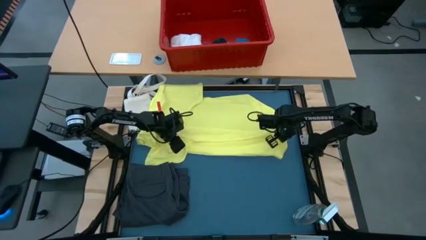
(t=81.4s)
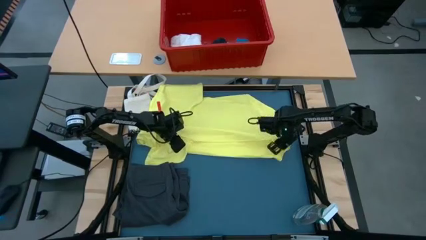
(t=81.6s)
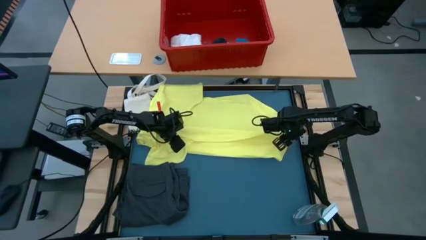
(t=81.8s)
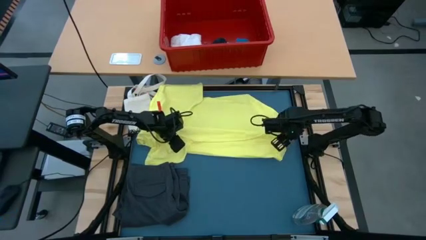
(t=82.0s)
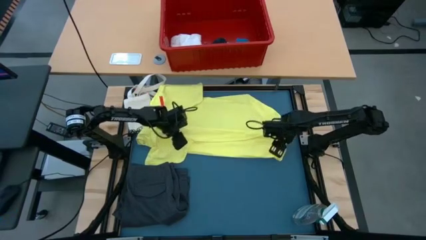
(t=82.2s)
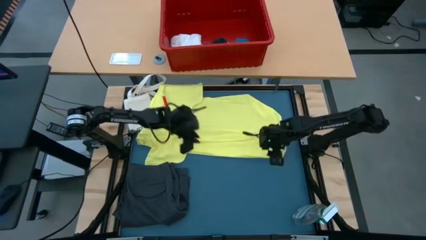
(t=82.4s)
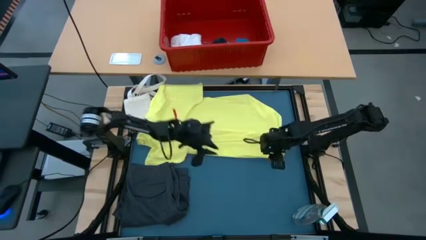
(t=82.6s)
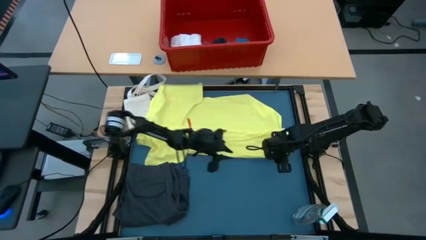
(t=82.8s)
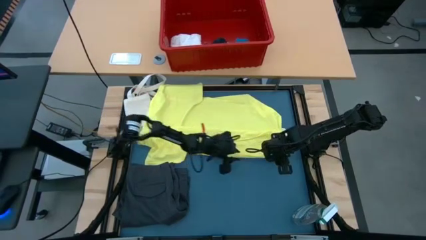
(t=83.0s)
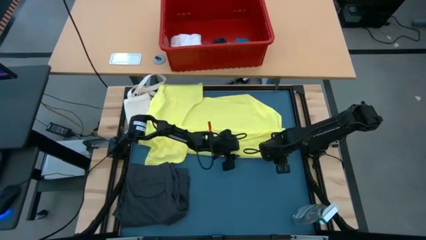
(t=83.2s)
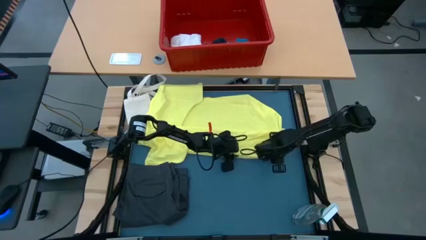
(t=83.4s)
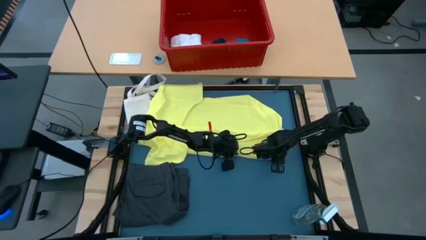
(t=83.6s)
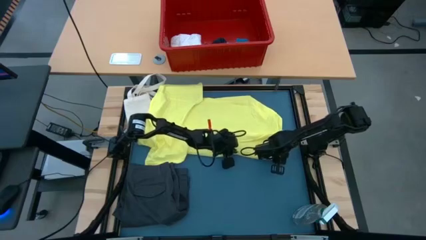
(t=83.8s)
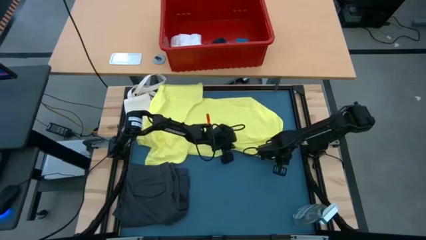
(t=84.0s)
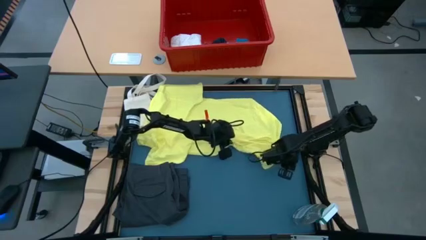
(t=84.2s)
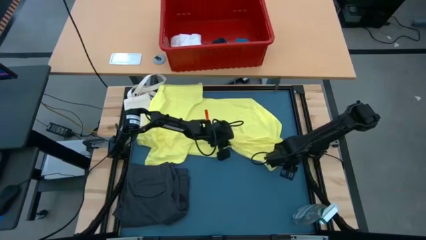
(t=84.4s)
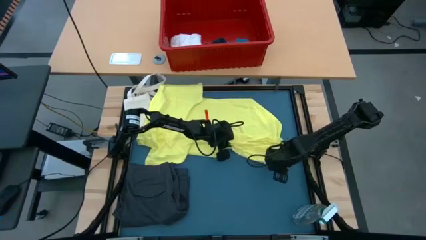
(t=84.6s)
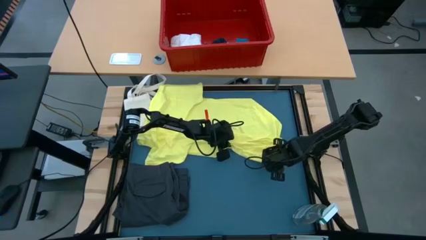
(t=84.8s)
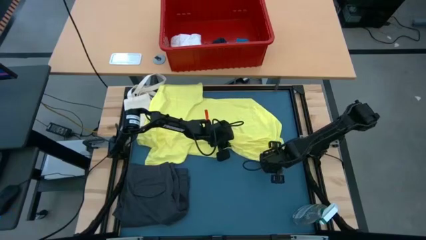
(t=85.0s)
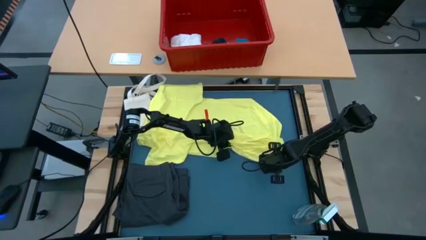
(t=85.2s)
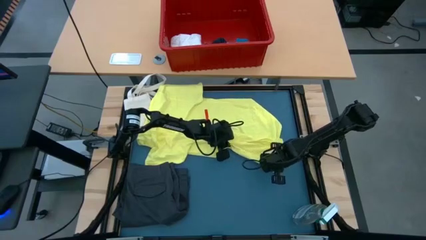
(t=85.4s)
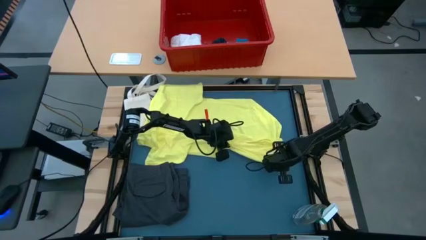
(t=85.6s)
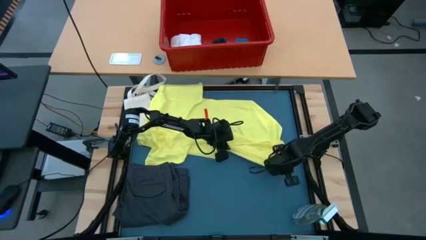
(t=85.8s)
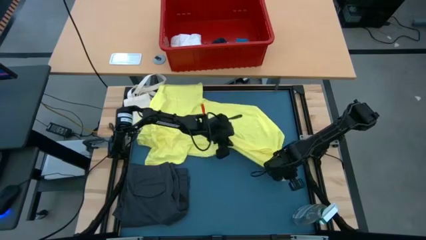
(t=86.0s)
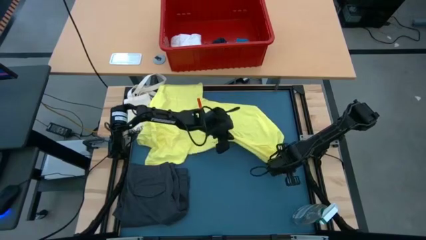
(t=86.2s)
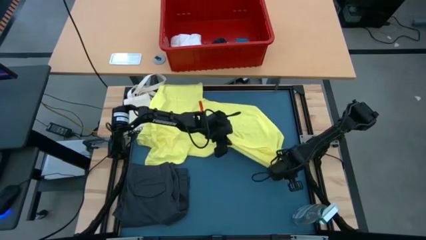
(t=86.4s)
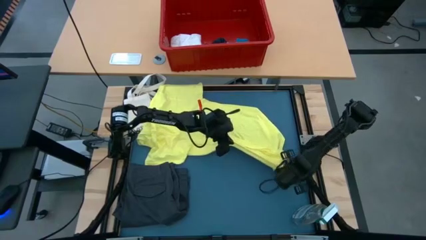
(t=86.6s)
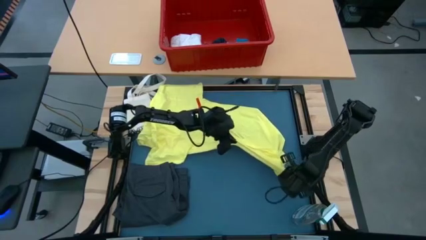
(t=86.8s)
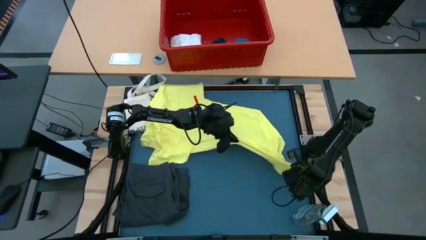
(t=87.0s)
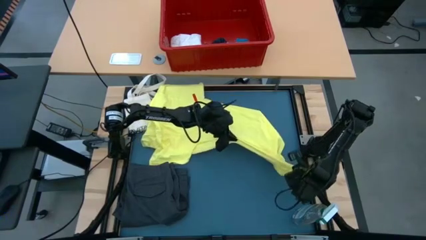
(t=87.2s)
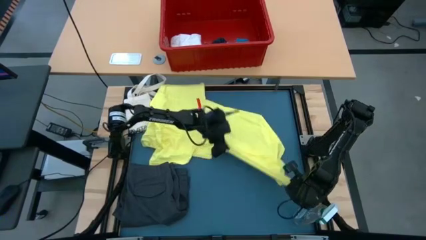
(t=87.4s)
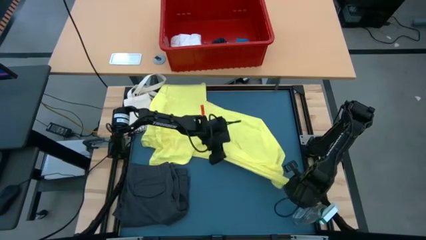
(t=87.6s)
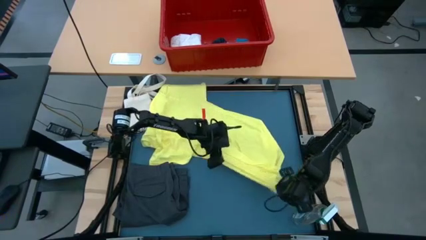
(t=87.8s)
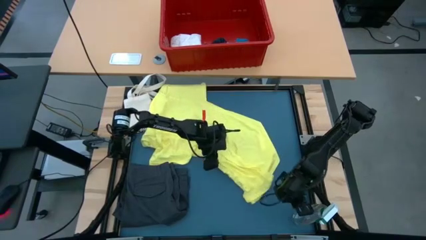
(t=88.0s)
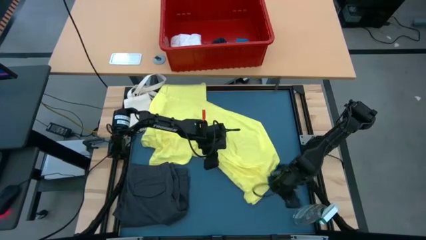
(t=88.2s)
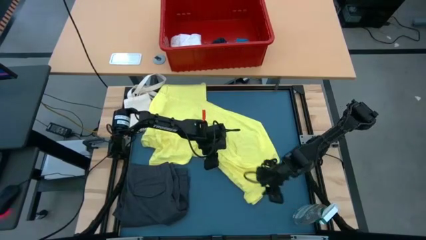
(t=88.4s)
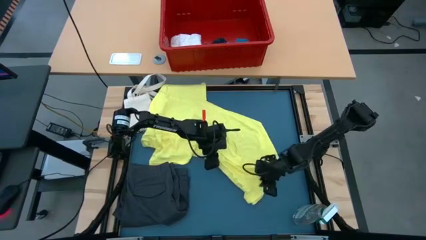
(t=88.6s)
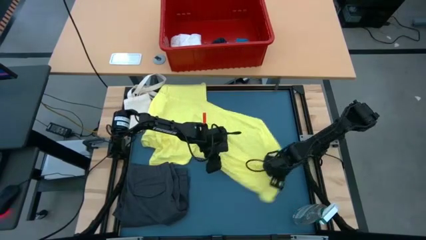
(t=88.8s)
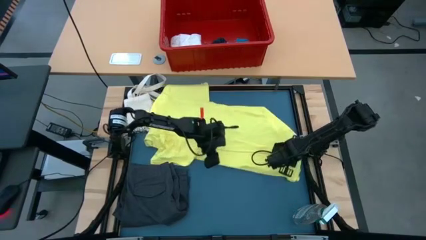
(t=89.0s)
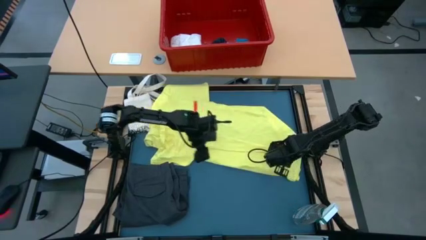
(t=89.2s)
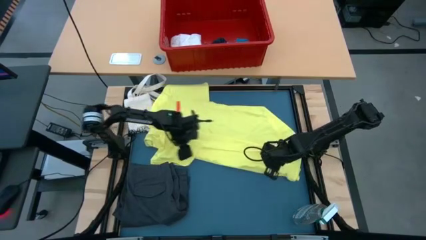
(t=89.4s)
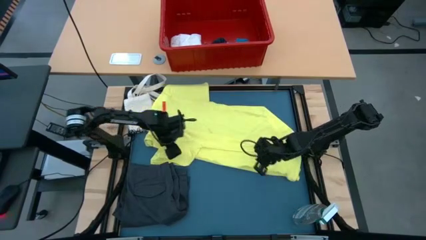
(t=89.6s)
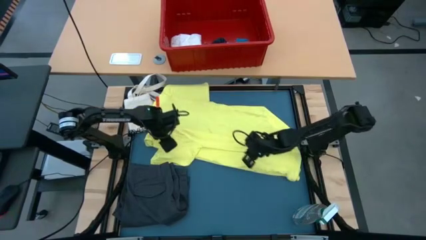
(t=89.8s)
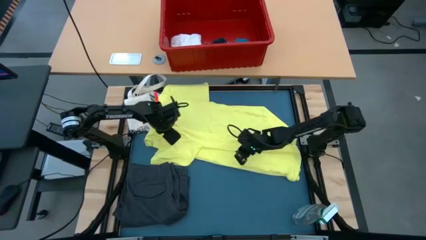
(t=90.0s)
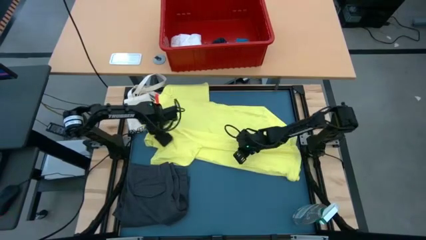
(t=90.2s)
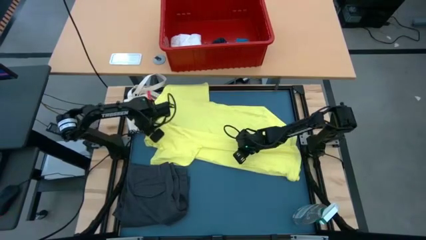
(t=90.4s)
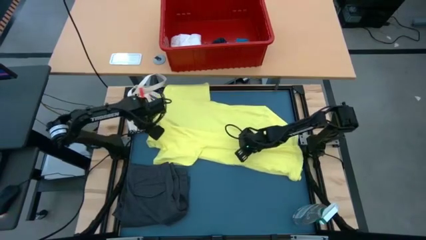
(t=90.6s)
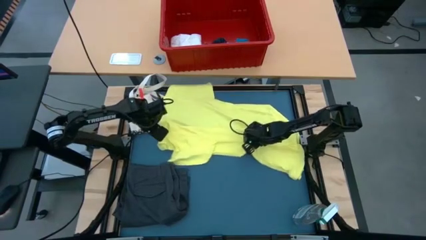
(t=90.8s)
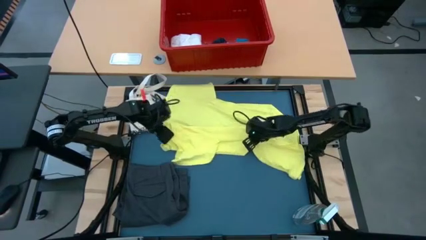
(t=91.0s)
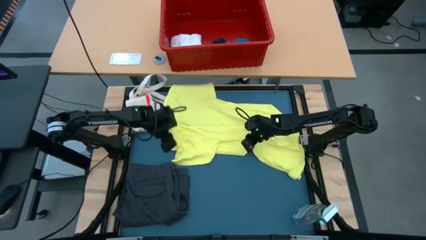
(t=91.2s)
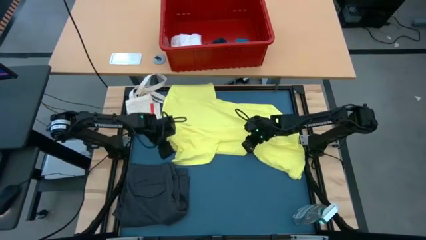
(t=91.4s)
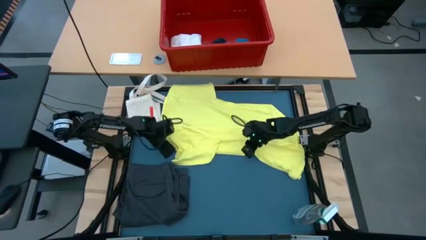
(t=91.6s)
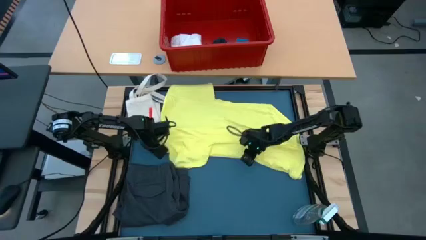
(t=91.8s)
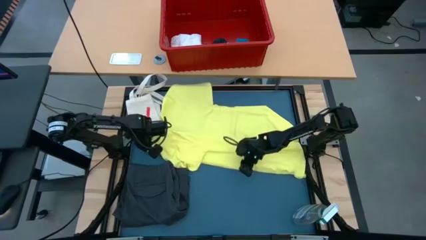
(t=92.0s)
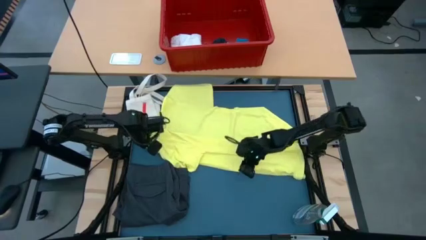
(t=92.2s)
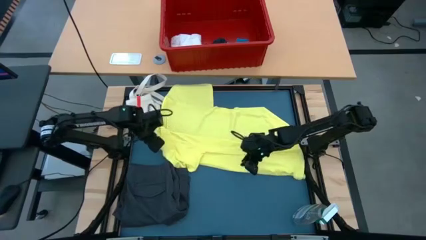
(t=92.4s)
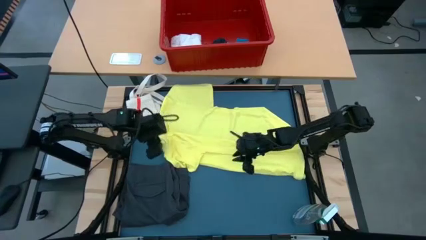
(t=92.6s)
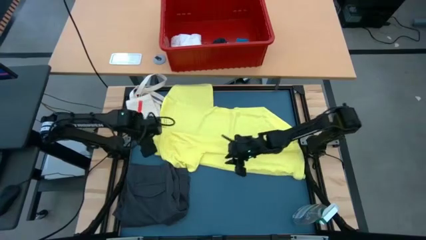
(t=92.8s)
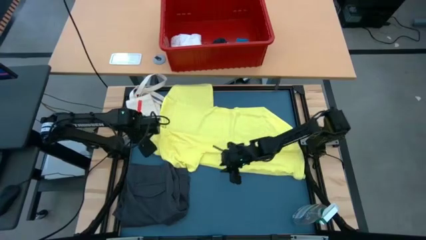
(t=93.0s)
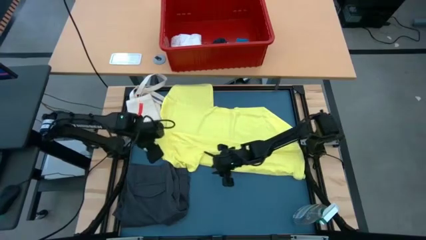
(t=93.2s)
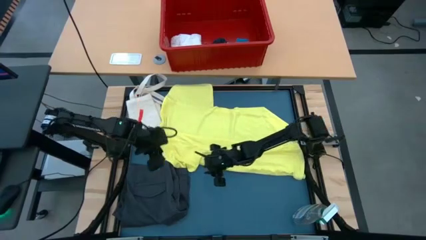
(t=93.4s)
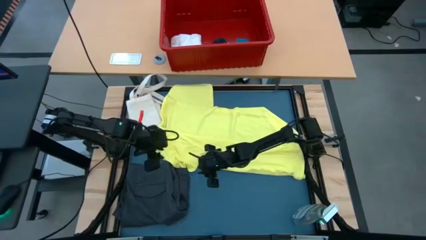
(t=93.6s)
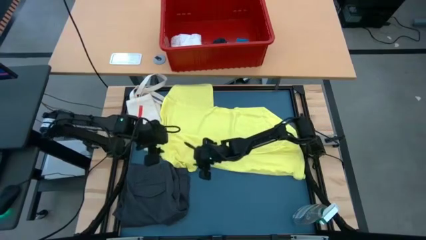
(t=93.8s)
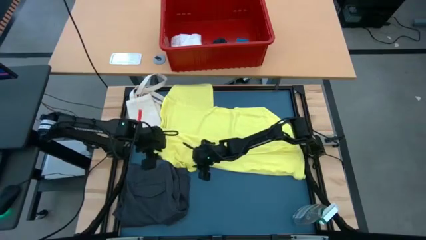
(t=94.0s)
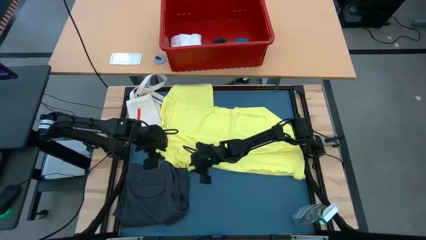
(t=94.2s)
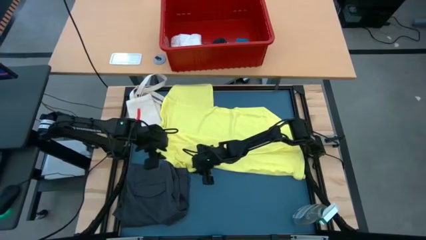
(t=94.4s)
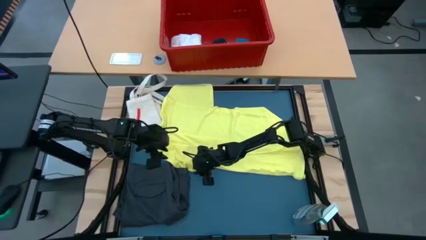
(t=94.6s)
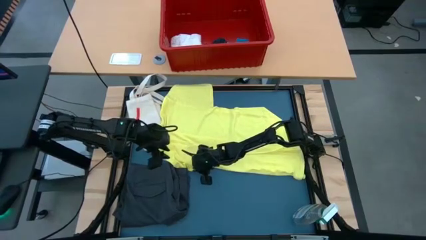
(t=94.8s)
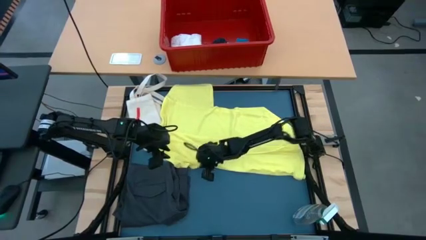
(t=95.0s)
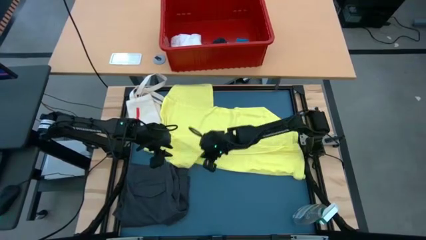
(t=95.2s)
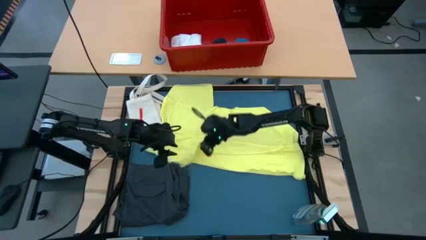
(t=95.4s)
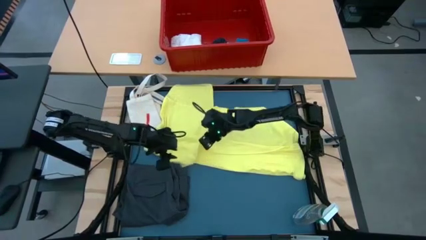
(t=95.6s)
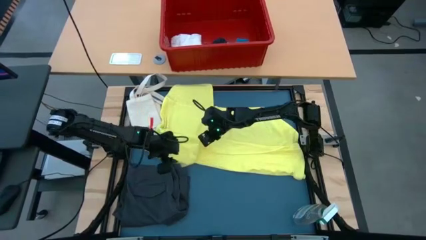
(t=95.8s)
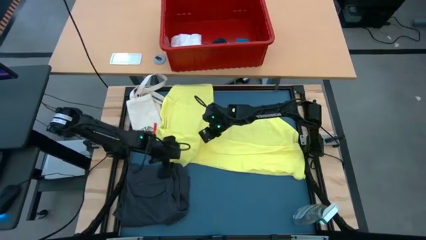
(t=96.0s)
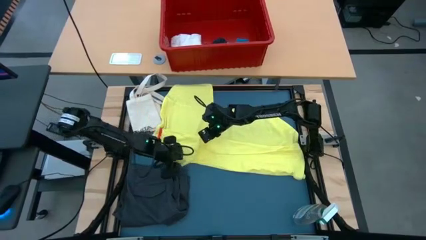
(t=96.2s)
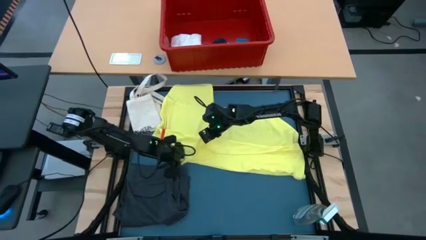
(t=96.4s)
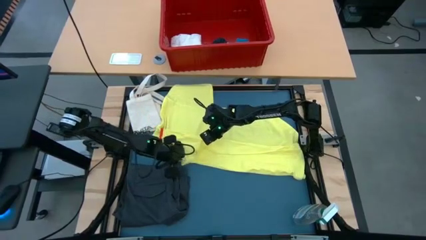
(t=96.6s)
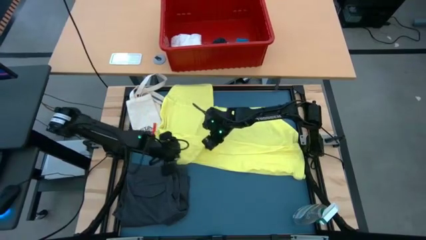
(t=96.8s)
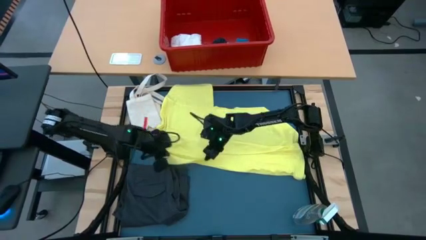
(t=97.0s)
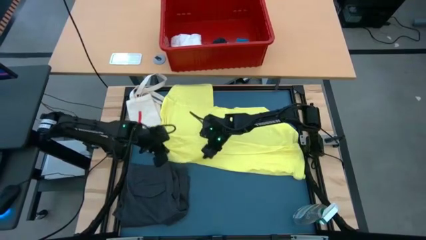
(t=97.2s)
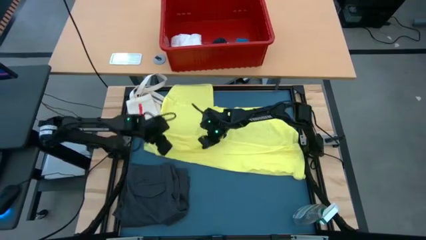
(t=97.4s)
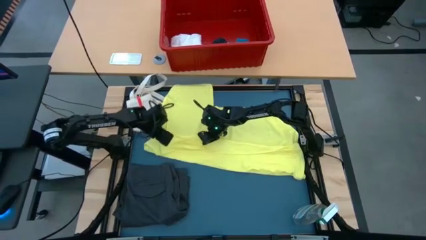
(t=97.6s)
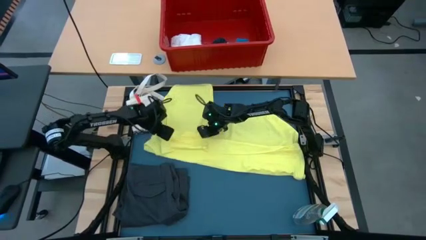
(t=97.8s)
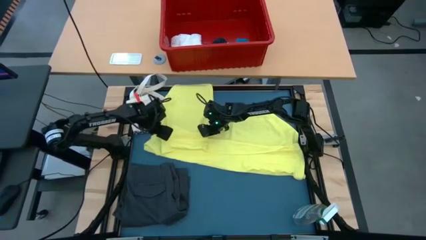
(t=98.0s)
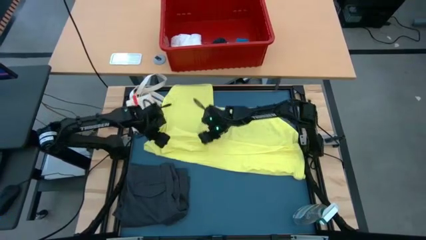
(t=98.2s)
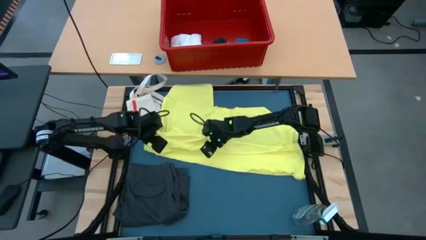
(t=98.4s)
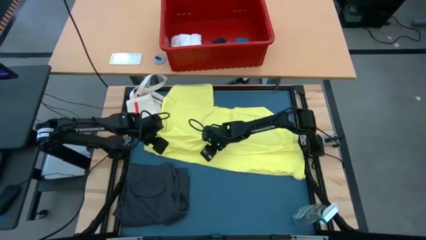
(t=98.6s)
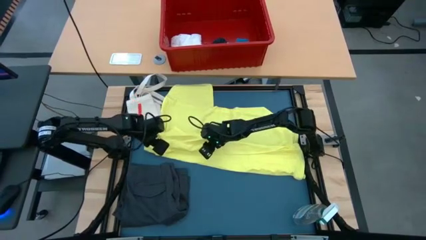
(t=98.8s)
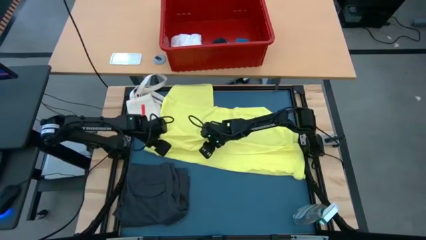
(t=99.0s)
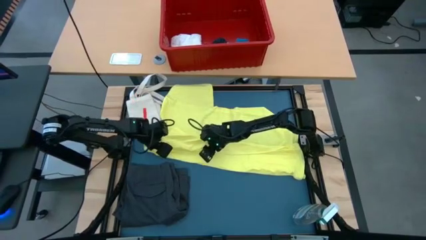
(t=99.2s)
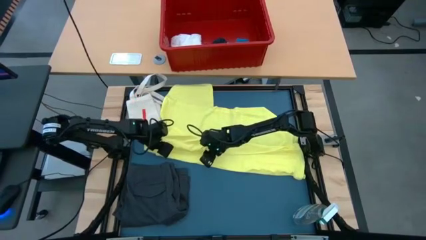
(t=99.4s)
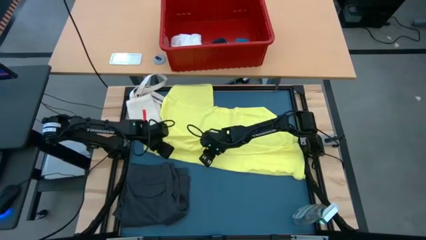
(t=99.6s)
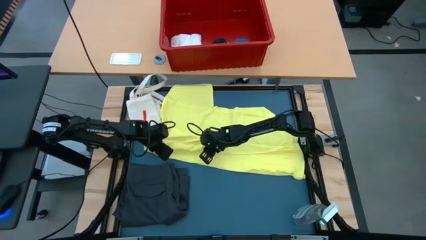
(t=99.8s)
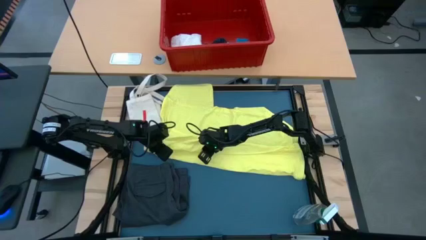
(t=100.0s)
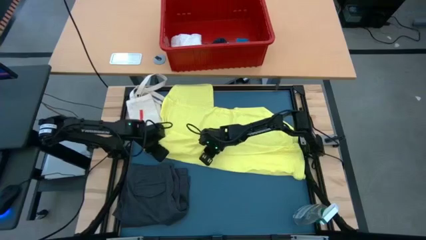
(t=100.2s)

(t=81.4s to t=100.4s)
Task: Fold laundry
Fold the yellow shirt
